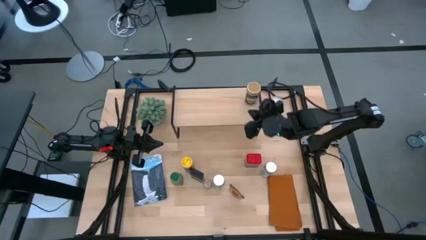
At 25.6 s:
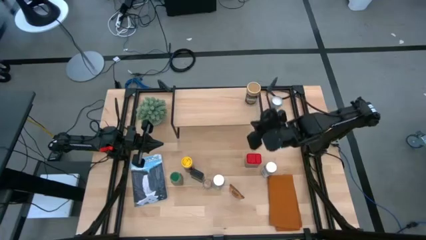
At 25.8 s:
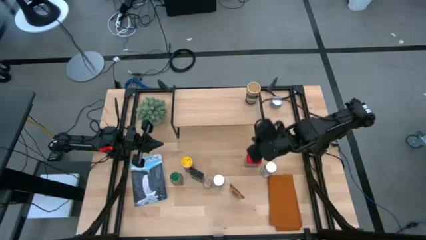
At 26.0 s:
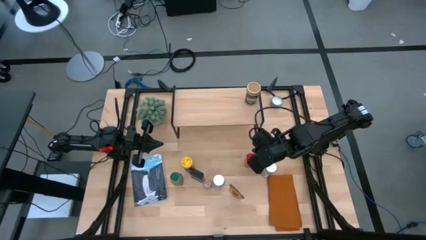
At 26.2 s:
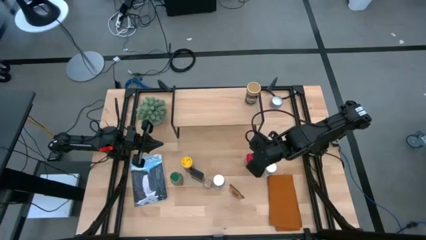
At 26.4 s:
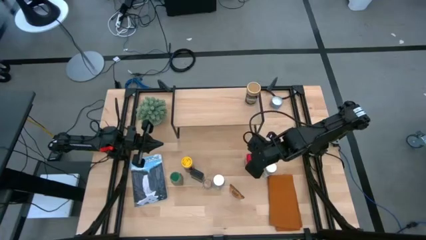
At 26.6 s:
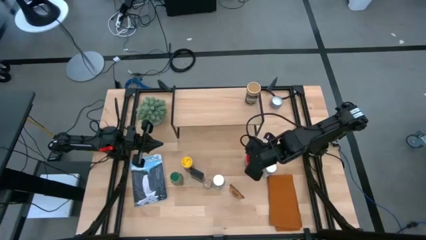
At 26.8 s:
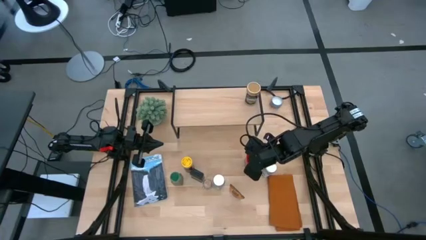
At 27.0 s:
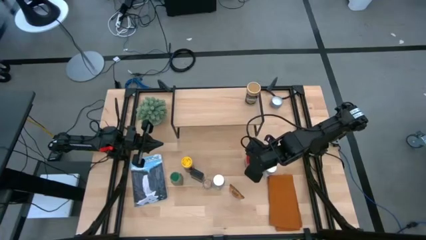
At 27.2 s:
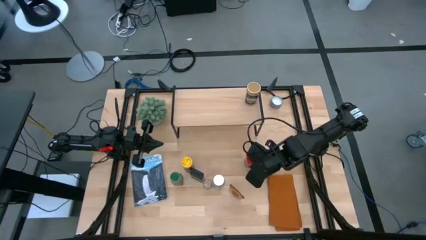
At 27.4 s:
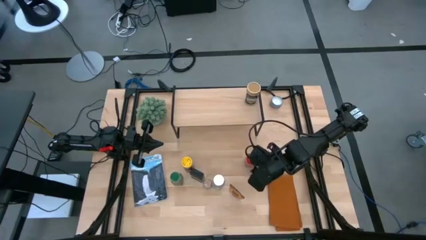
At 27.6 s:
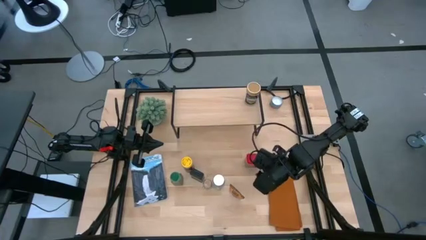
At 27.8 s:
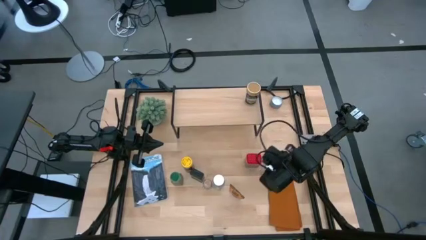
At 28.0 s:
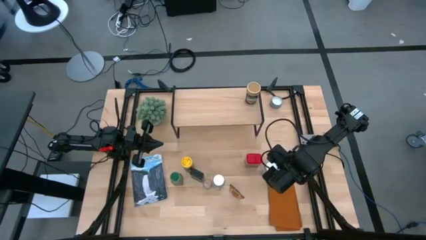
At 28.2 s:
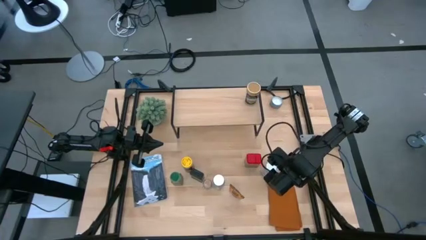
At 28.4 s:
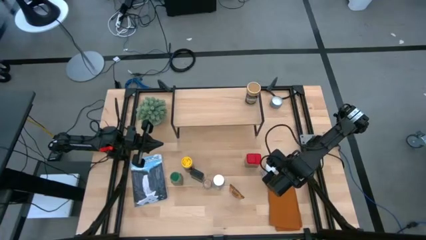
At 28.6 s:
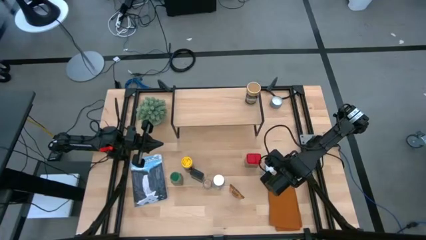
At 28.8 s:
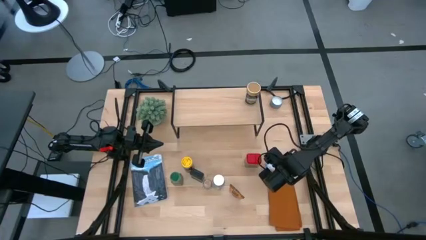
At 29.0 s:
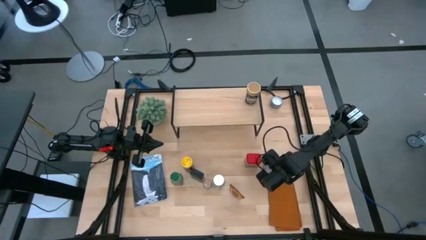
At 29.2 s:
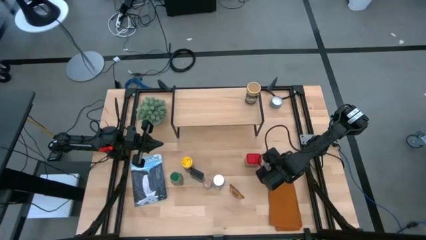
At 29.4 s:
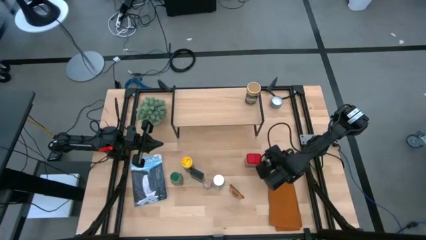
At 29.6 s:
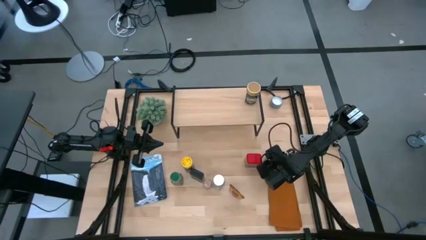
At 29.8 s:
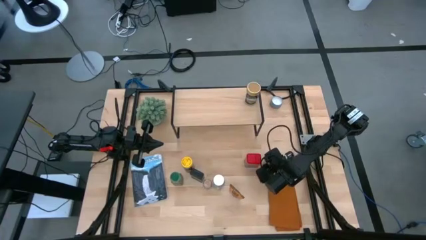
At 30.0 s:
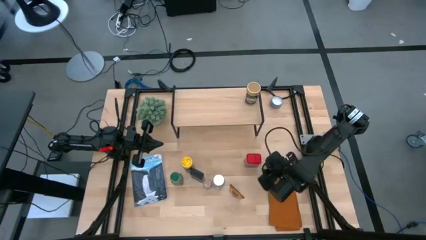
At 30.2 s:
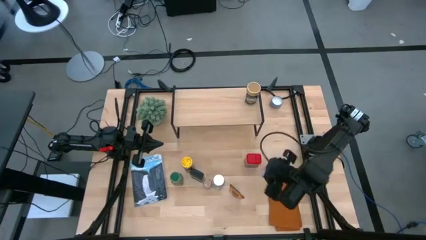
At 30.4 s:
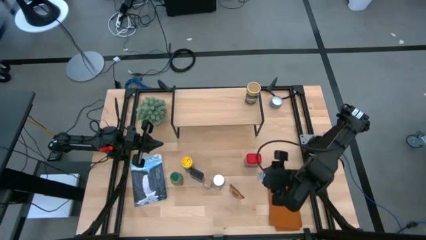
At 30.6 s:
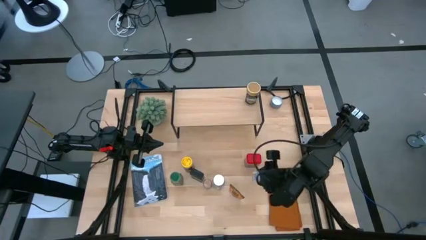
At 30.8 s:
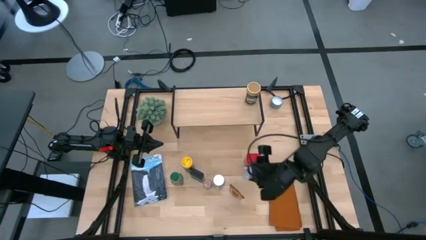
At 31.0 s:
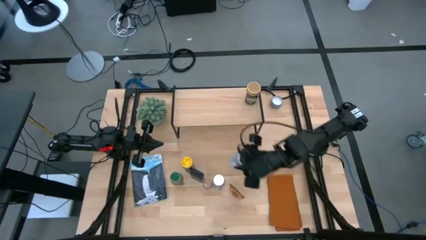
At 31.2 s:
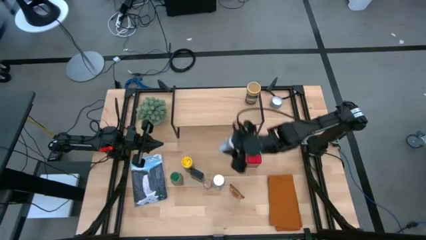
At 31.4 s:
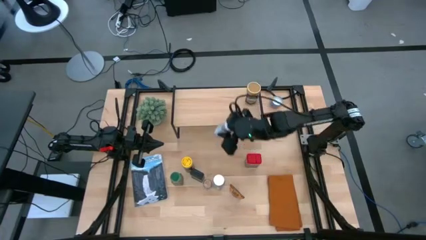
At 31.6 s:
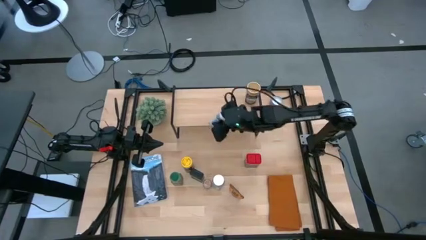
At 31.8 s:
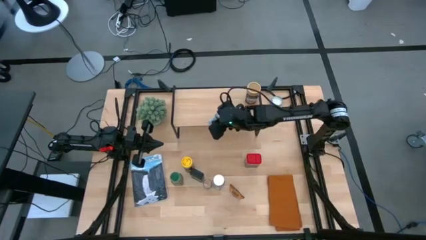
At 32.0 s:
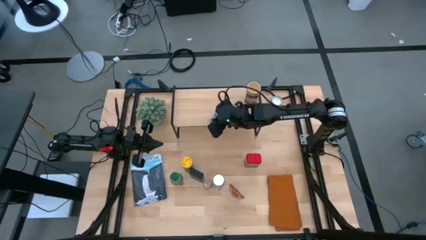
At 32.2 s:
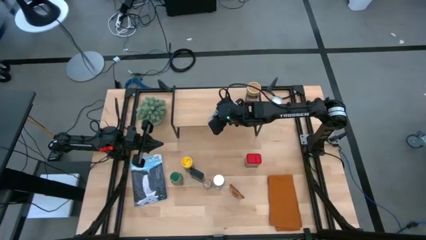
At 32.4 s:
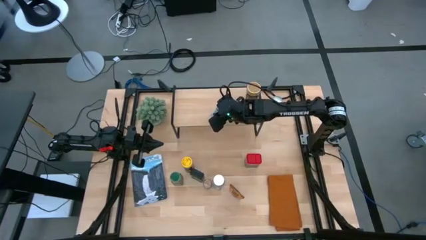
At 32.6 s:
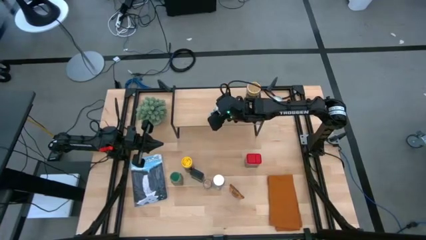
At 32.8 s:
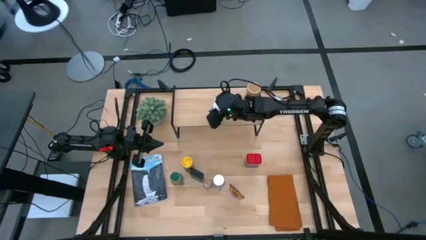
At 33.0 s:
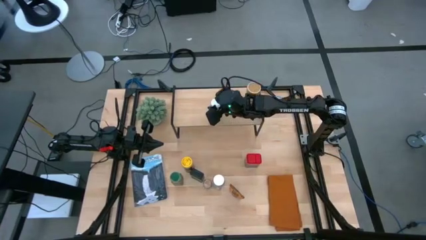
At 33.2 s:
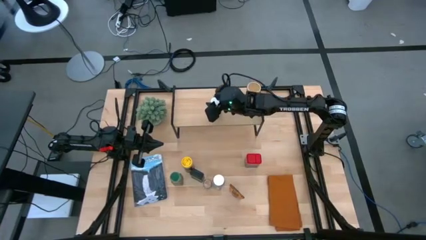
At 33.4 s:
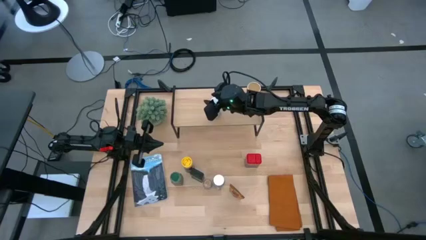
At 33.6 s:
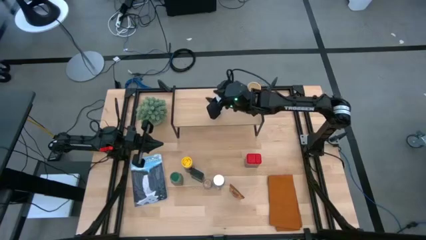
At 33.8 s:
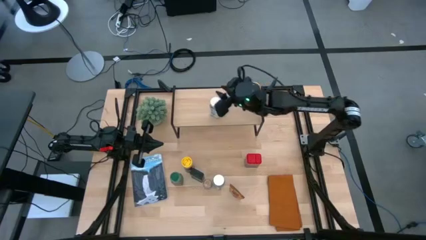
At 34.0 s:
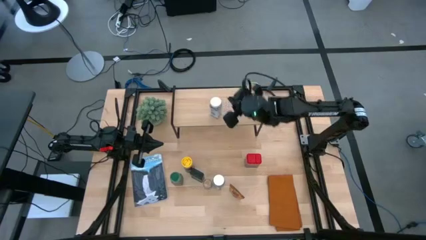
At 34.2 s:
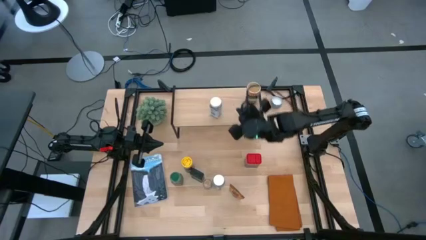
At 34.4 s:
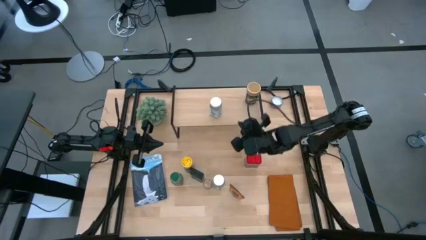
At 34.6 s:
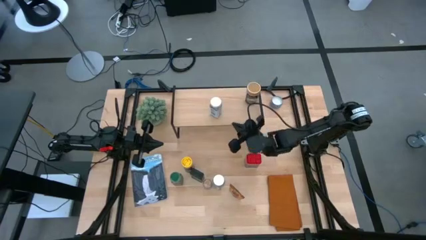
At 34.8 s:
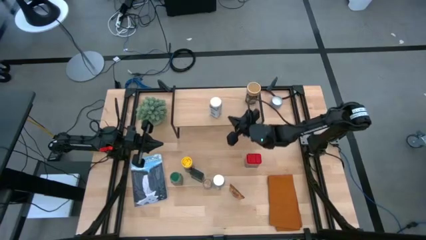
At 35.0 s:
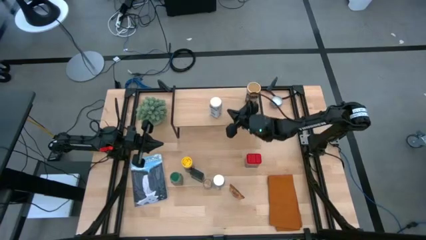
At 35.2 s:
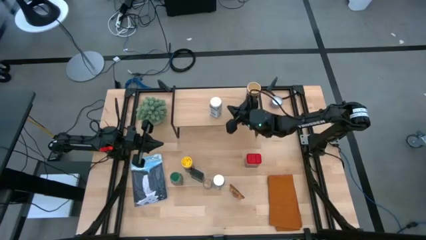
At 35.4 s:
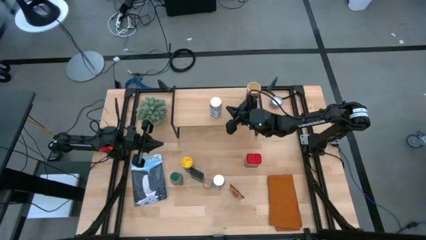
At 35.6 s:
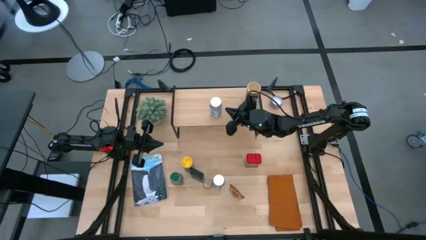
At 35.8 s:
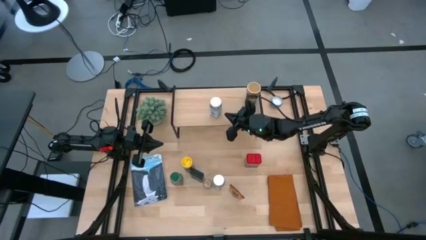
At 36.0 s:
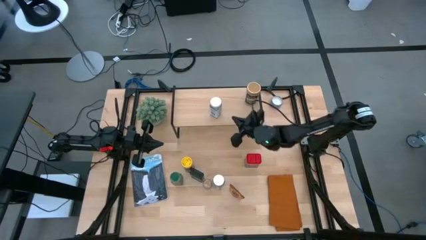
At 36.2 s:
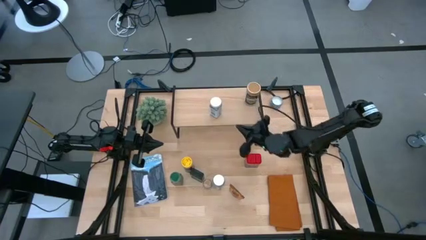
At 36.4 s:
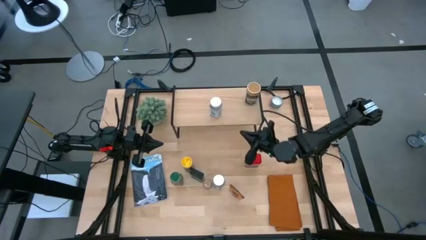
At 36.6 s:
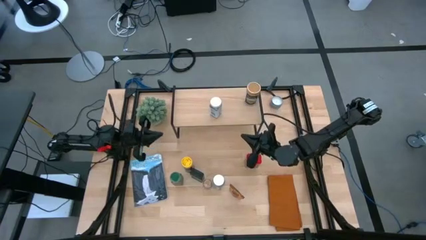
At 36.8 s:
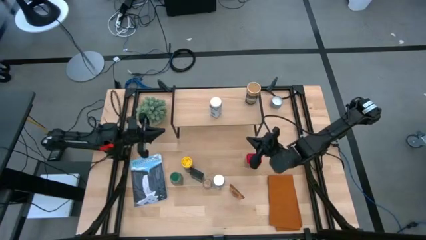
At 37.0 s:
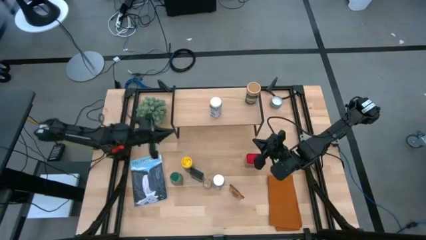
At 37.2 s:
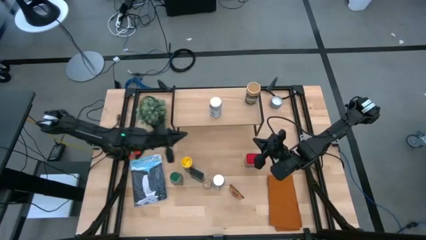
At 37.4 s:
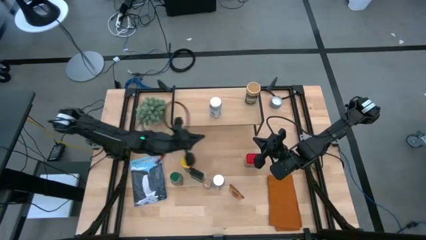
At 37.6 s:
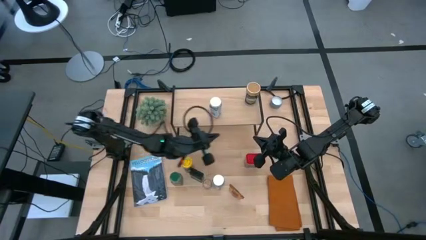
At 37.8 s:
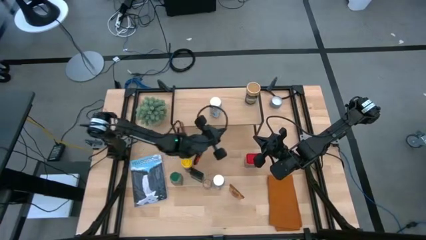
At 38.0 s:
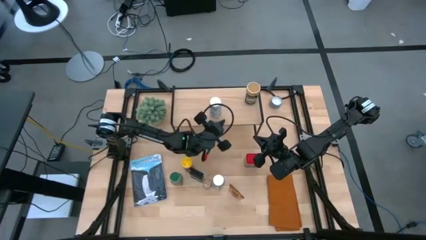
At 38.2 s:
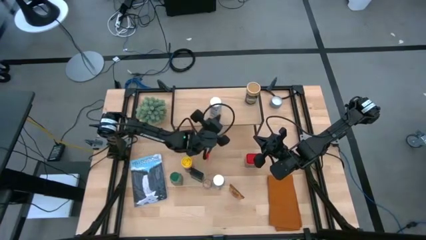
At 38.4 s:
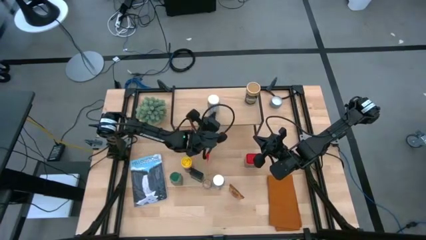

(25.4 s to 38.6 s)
Task: Shelf spices
Put the right white seasoning bottle on the shelf

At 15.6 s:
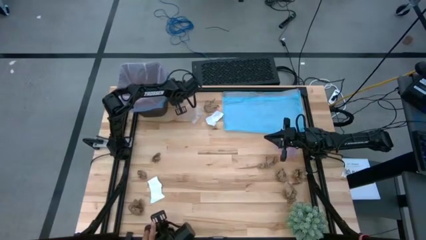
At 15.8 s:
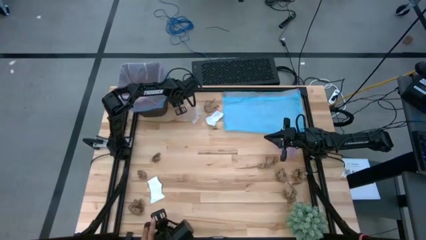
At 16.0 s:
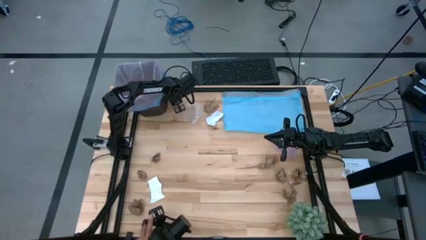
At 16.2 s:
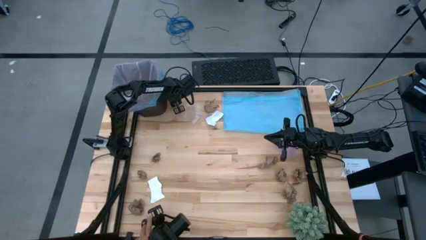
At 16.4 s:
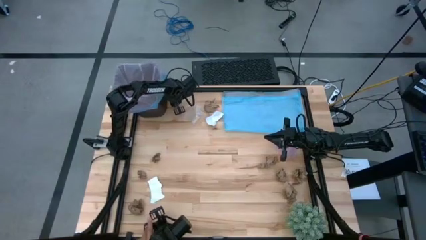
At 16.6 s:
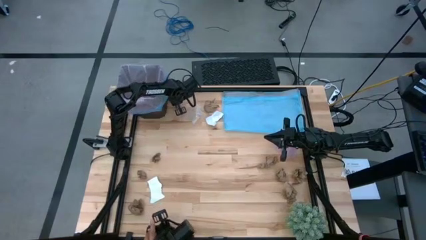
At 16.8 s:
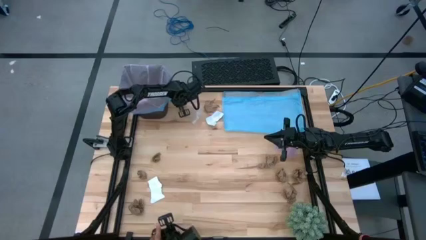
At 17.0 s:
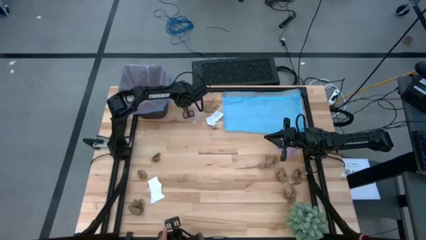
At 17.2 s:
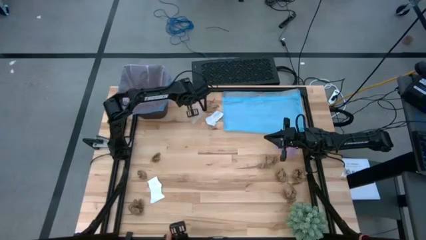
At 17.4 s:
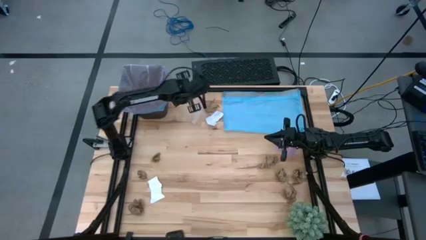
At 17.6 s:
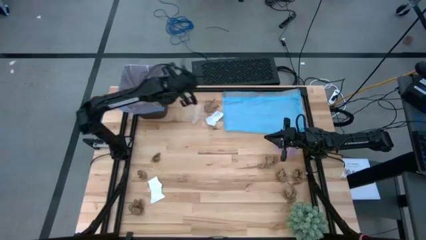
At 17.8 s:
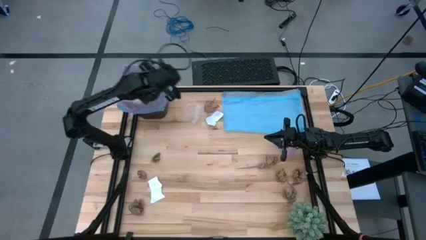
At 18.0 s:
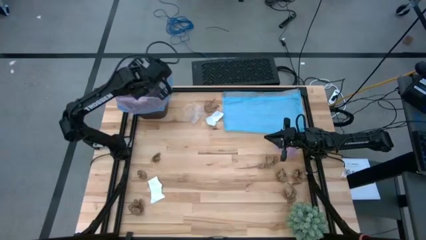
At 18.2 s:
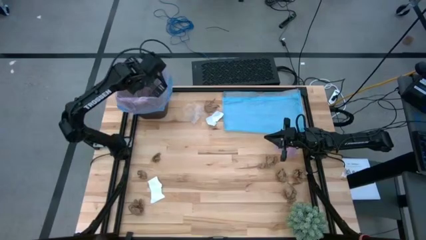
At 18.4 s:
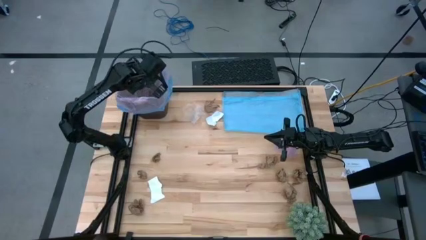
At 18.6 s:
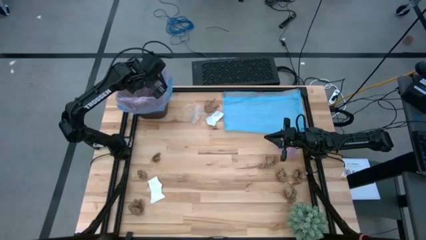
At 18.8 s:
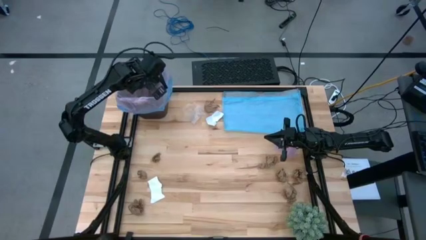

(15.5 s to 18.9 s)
Task: place trash/remove bag and relplace
Put the brown napkin into the trash bin
